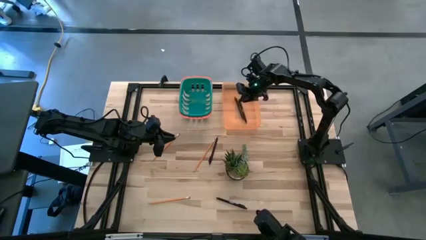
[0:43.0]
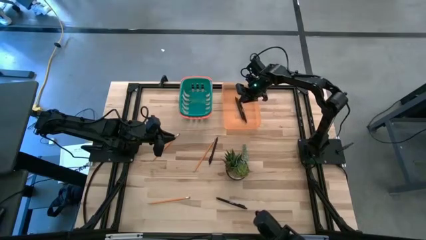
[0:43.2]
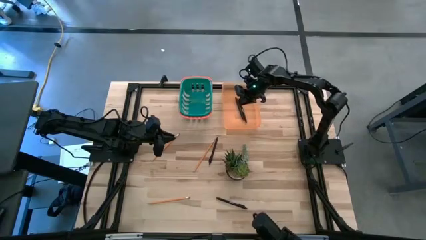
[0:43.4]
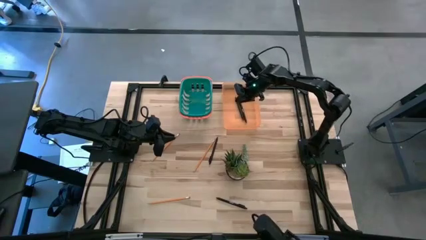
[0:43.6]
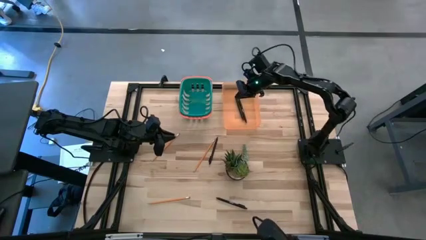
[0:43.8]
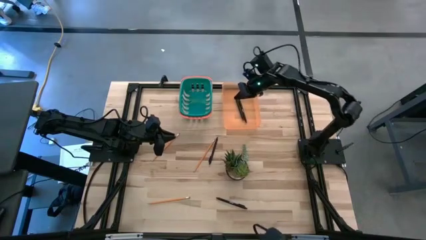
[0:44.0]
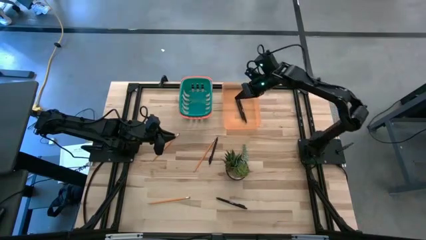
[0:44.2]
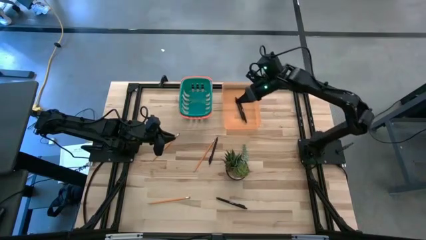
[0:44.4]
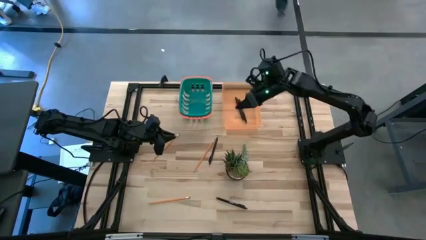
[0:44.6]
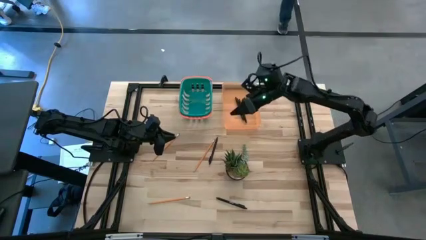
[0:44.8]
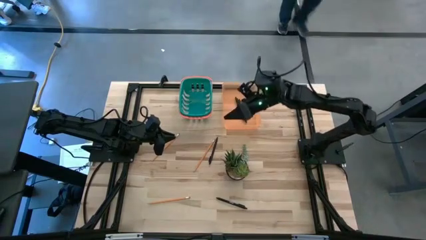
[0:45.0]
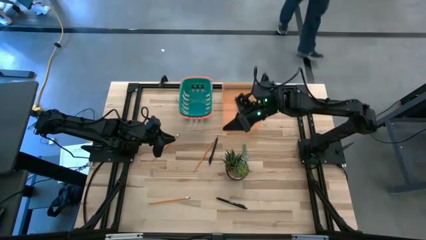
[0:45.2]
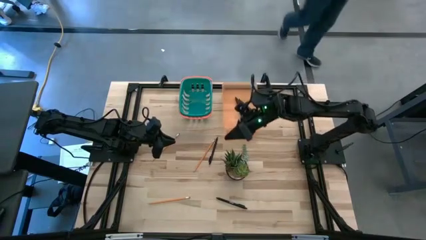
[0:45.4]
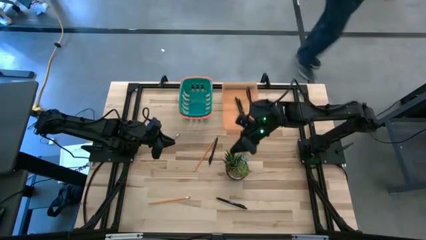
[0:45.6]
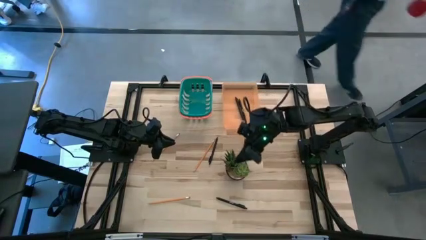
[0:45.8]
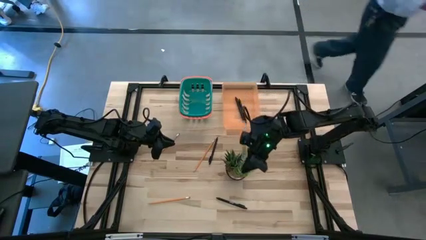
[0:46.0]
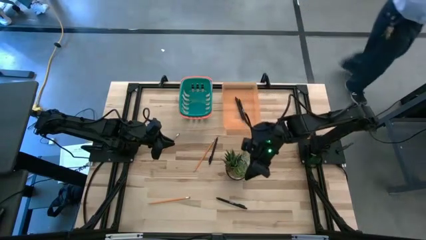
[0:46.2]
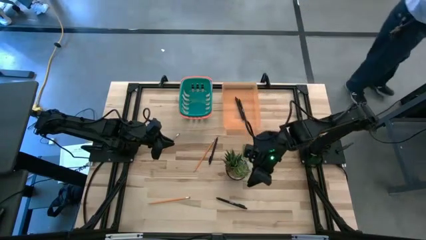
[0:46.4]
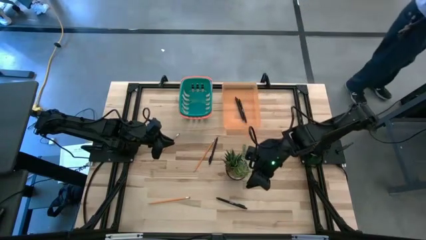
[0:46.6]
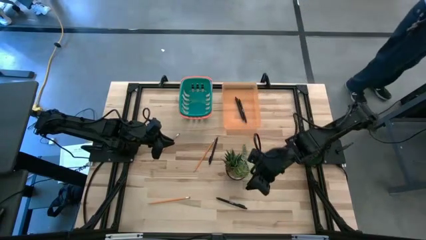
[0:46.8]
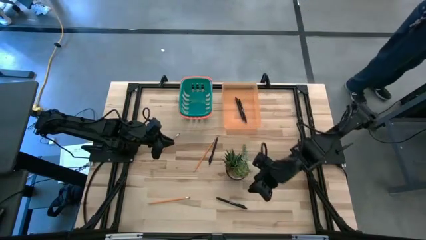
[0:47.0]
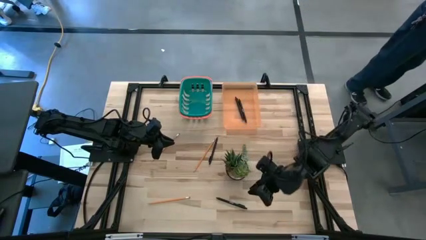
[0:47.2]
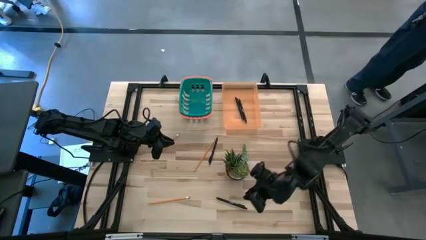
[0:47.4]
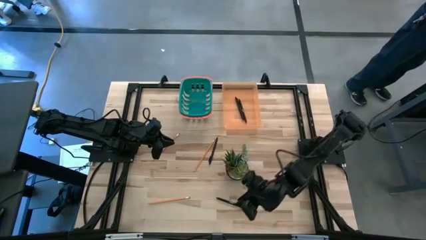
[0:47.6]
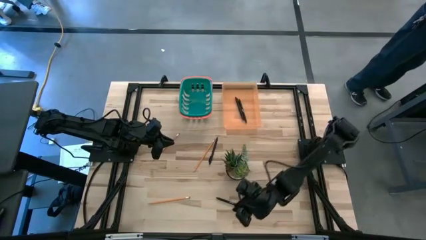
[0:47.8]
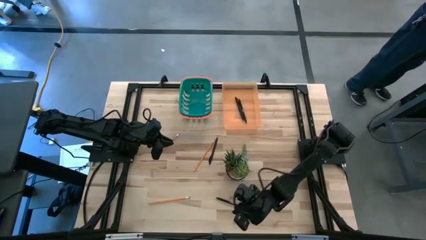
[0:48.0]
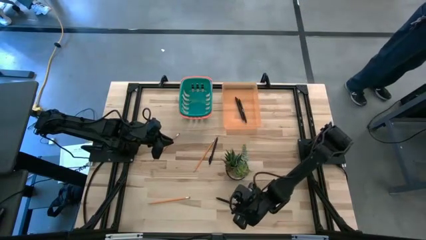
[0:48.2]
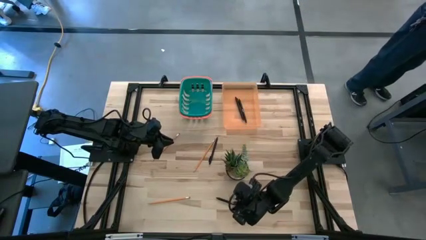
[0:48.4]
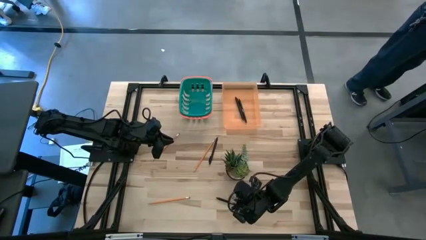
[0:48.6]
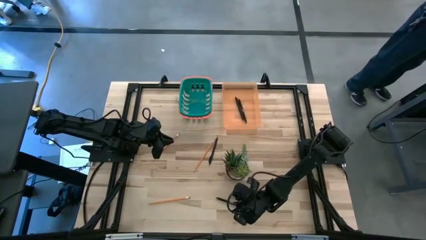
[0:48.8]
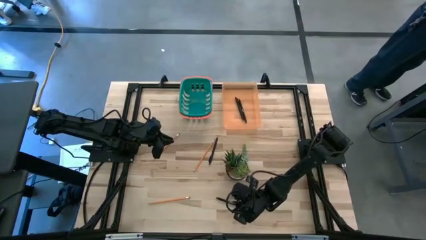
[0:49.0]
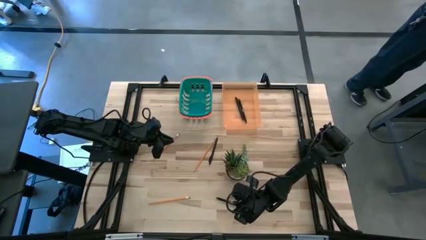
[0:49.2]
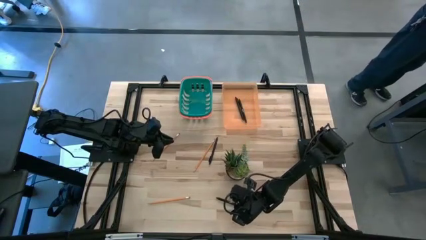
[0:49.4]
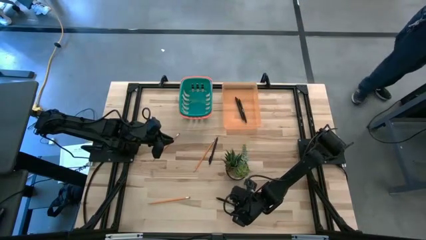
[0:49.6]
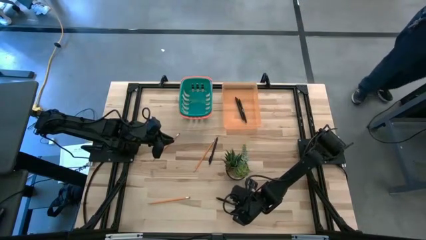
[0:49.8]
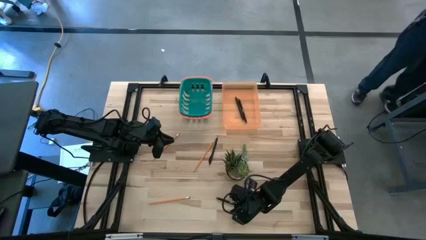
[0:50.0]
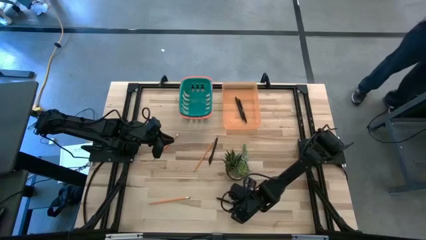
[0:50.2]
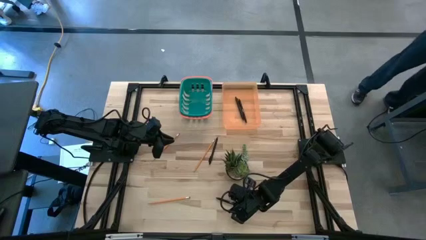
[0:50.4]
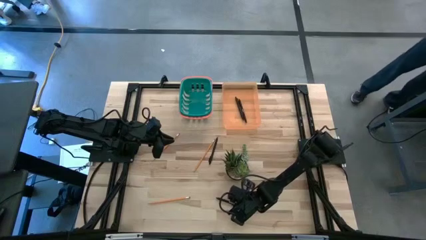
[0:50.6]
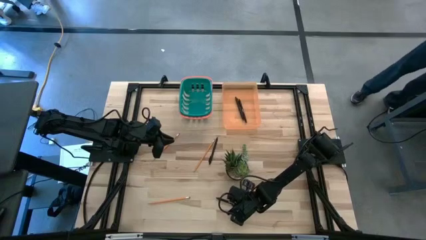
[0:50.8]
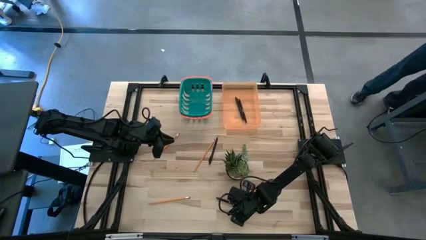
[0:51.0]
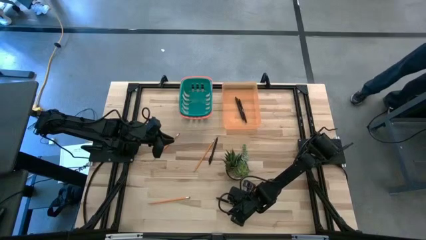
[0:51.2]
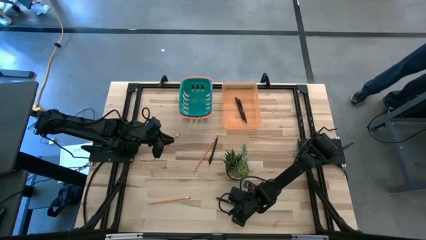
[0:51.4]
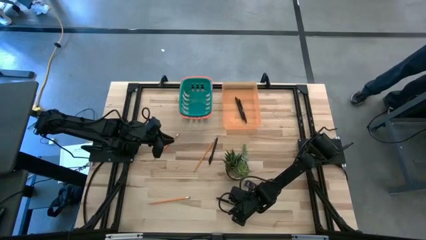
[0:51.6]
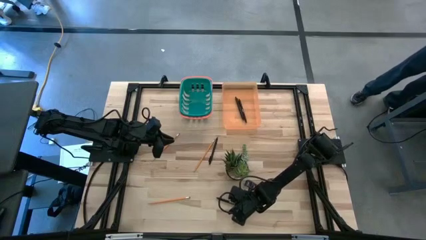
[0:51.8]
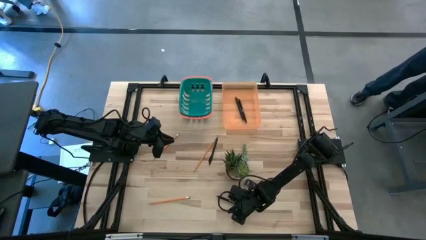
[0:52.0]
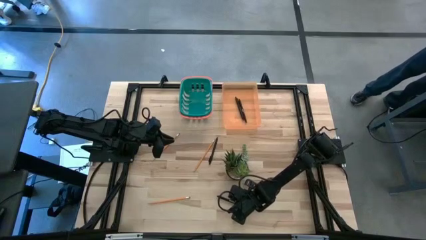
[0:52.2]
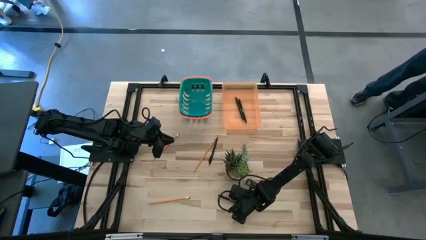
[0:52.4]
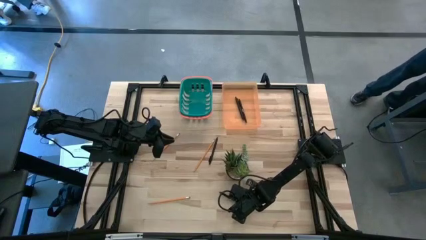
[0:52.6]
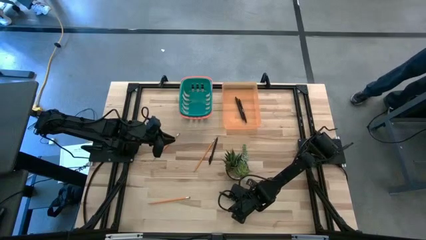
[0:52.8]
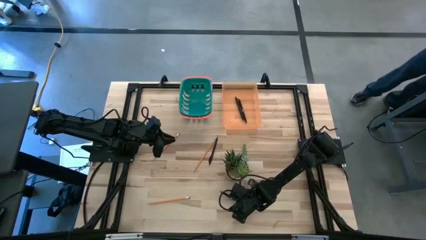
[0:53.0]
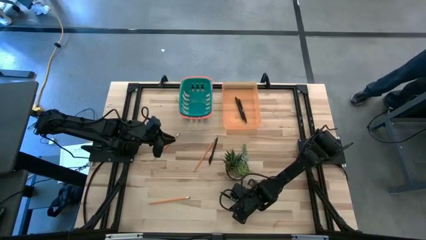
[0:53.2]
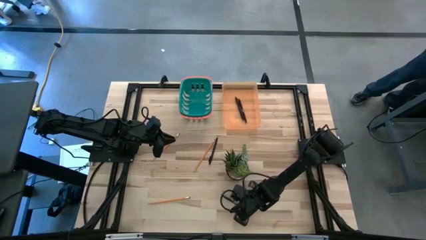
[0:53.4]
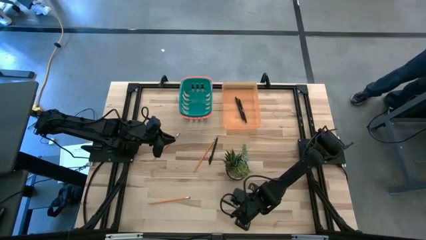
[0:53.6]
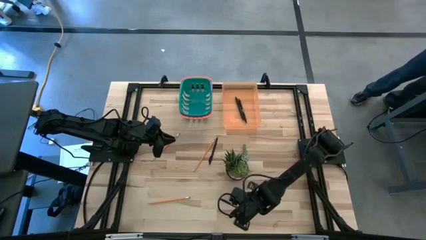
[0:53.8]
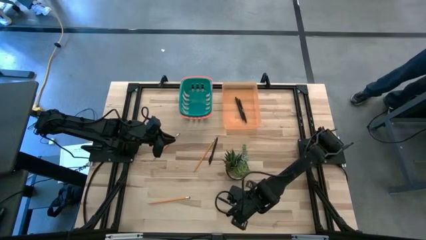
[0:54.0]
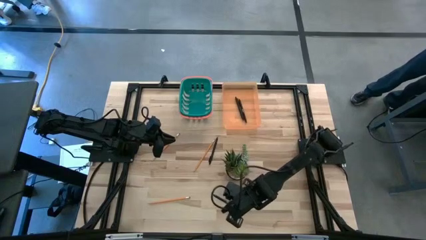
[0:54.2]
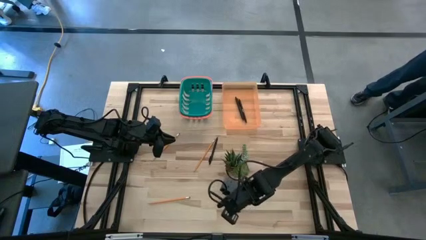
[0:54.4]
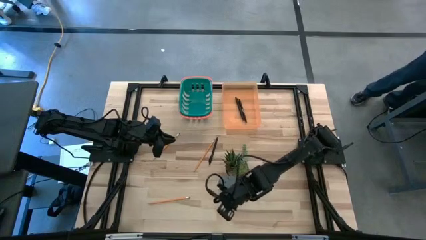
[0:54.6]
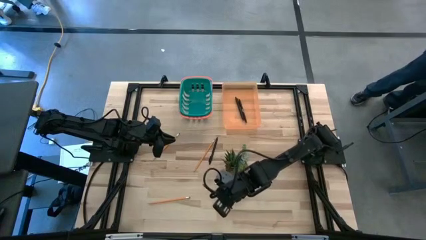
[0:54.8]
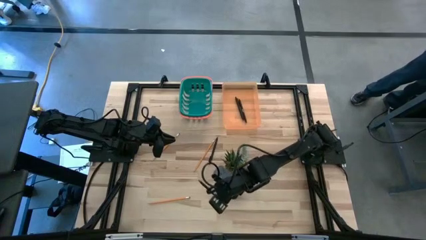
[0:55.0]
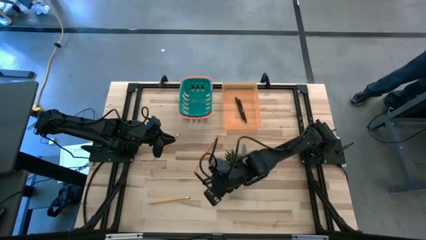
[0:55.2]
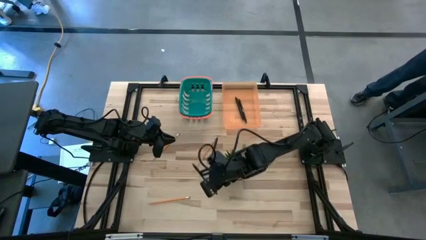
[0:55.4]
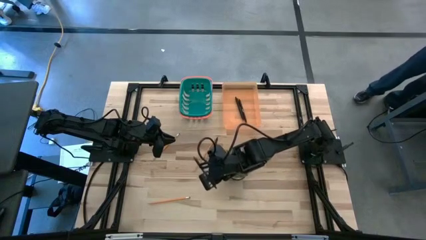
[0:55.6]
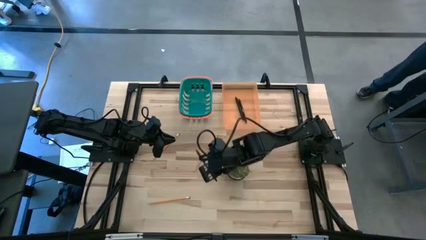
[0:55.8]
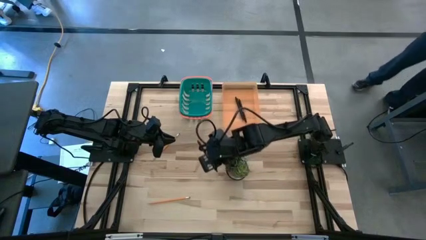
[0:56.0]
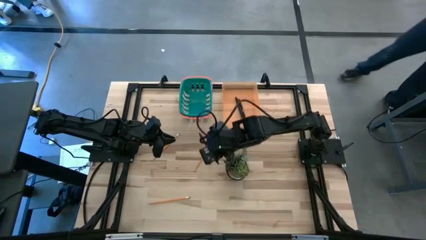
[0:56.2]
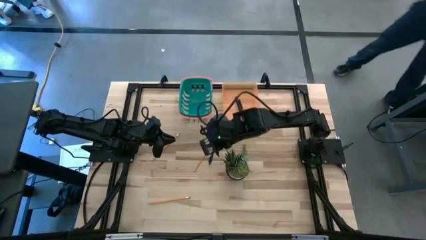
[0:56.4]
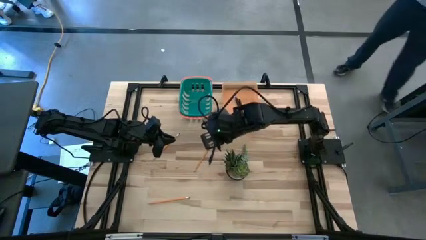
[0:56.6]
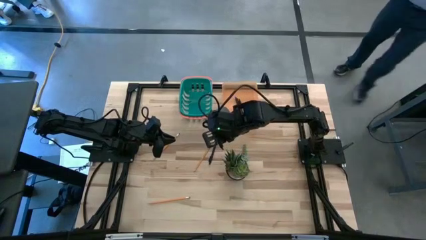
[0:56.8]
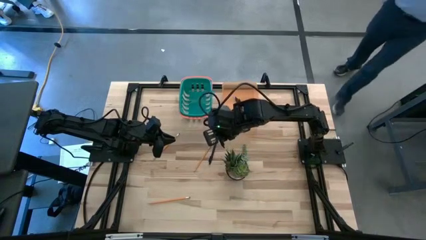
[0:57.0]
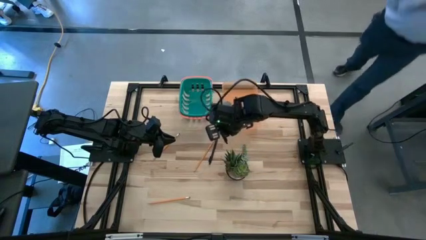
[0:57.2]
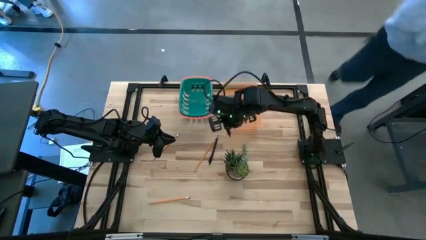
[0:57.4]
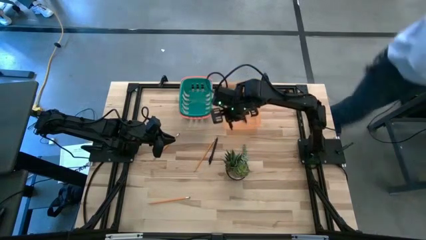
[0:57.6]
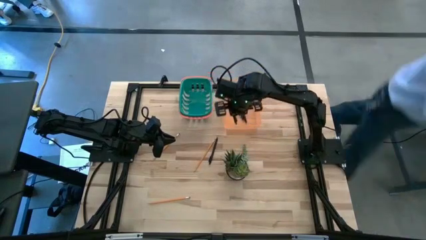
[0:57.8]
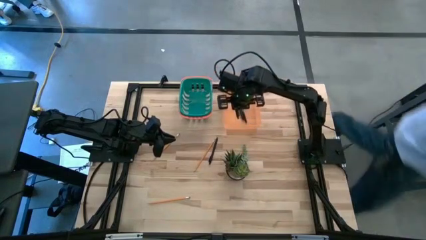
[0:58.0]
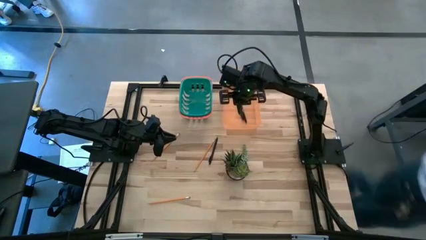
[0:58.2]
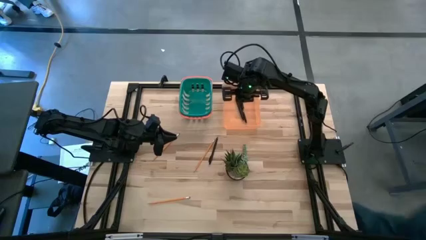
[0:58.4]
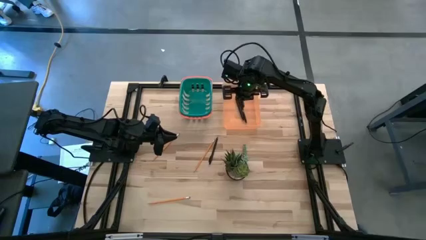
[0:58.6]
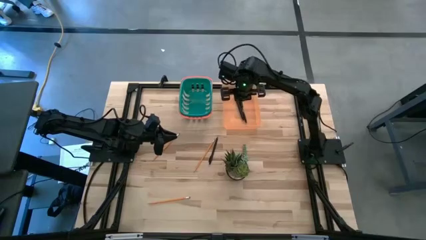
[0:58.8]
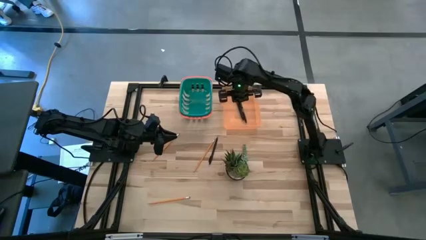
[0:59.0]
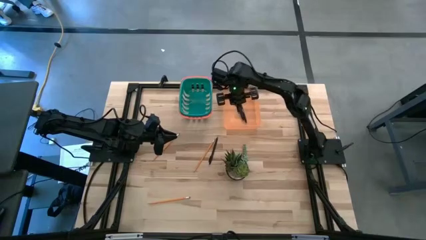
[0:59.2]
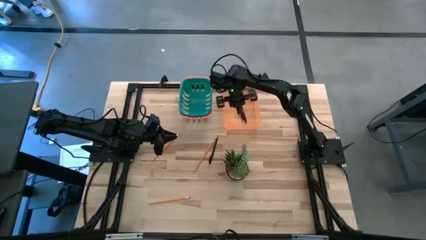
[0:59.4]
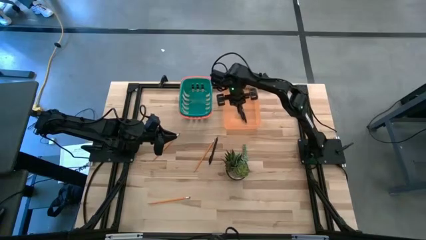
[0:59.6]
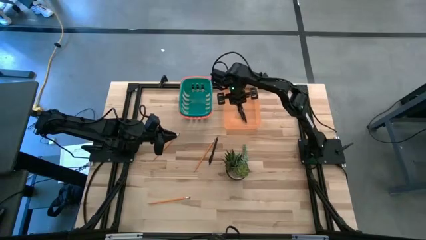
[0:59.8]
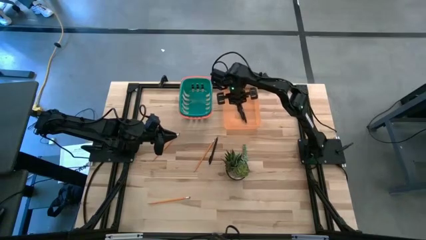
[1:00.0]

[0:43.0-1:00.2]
Task: Sort pens & pencils
Put the bottom black ballpoint pen into the orange bin
